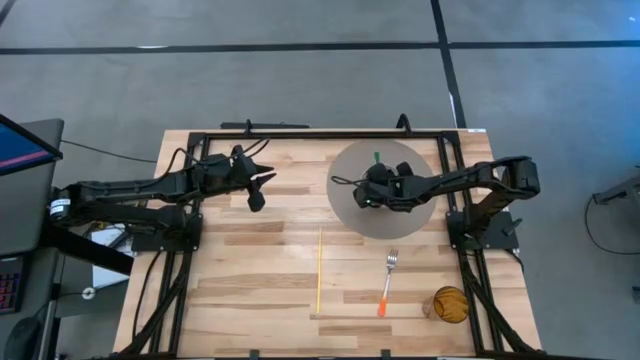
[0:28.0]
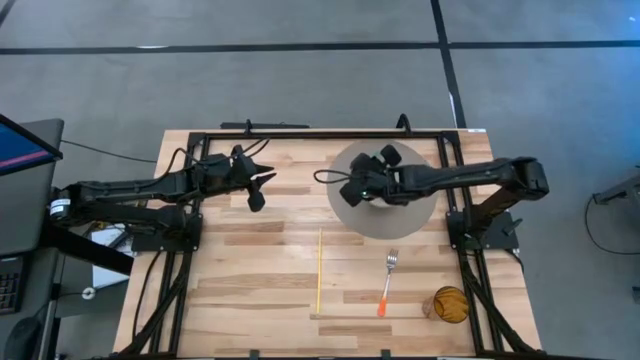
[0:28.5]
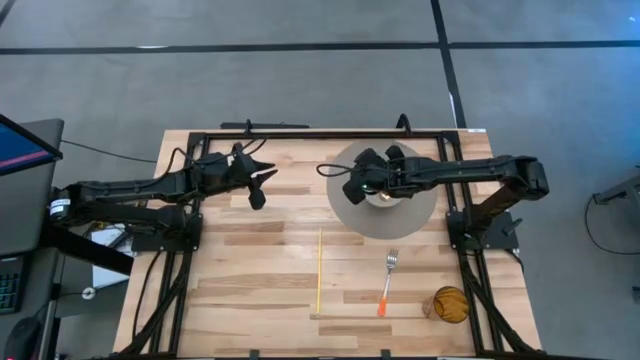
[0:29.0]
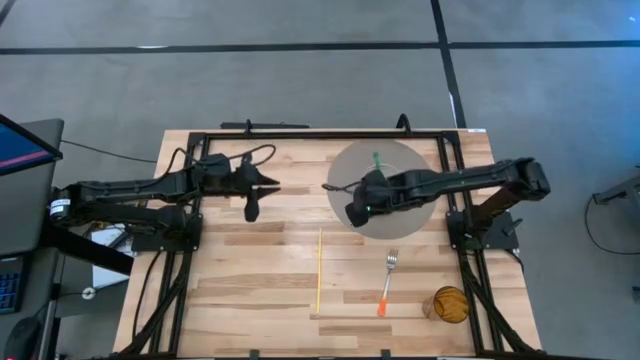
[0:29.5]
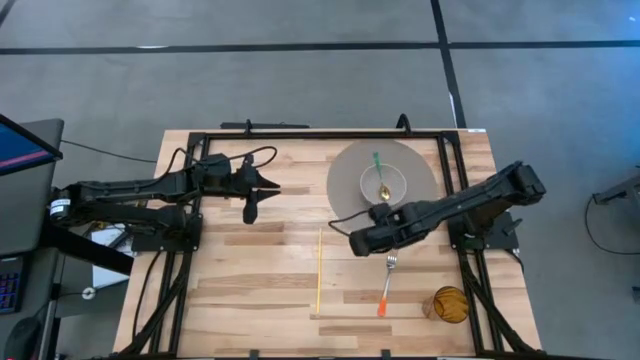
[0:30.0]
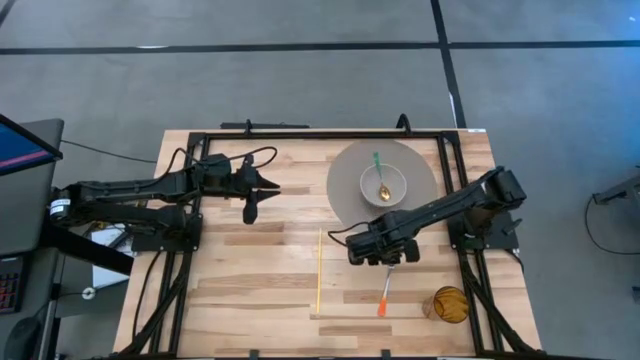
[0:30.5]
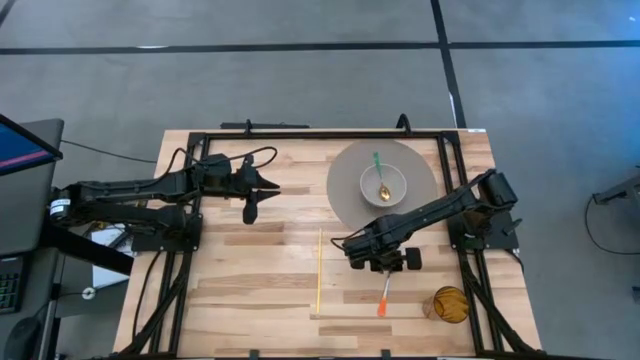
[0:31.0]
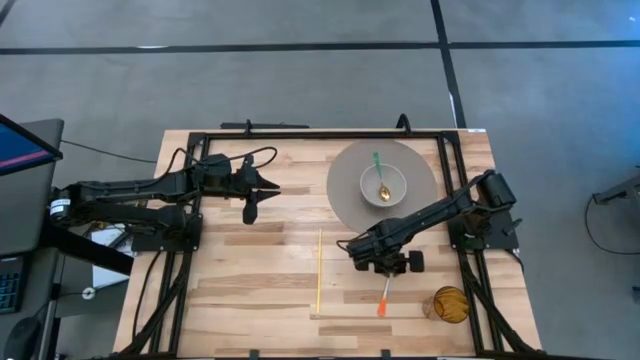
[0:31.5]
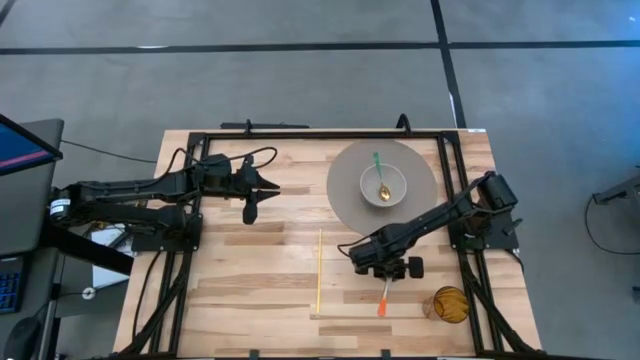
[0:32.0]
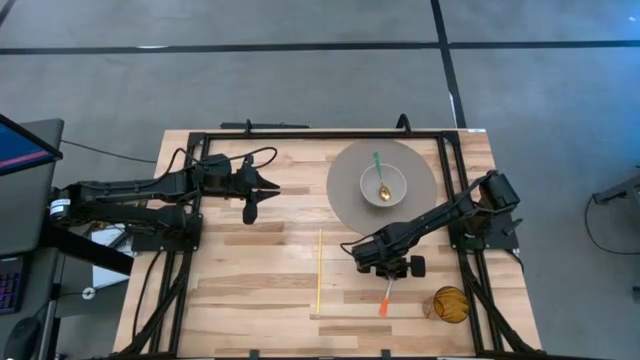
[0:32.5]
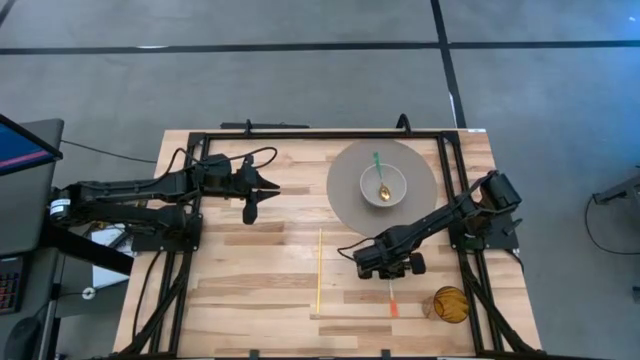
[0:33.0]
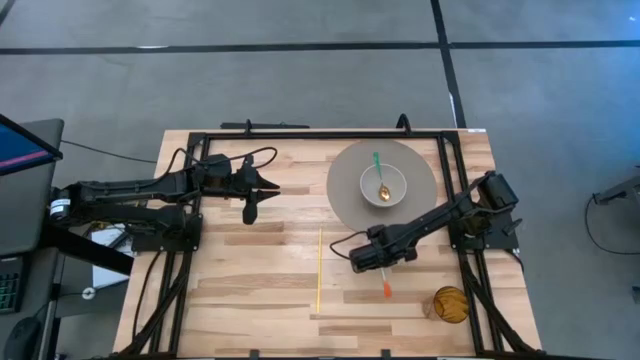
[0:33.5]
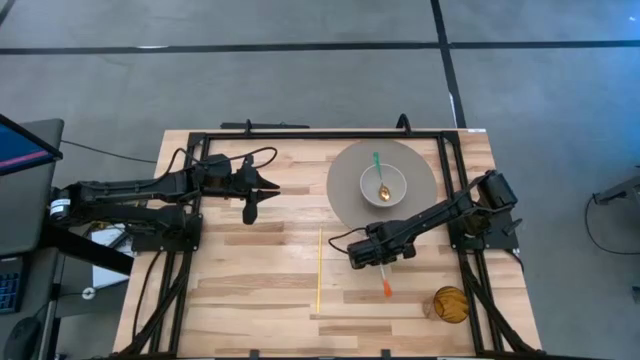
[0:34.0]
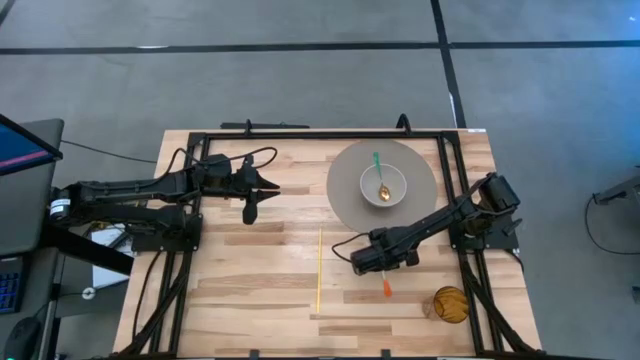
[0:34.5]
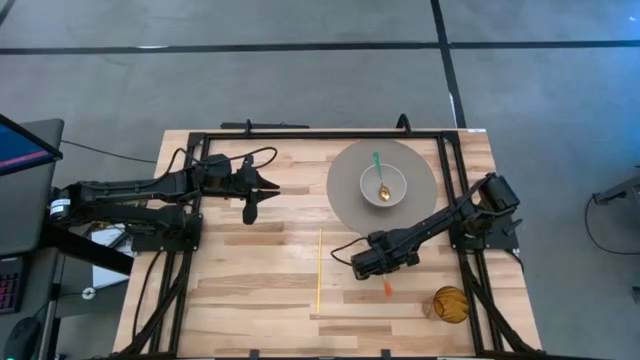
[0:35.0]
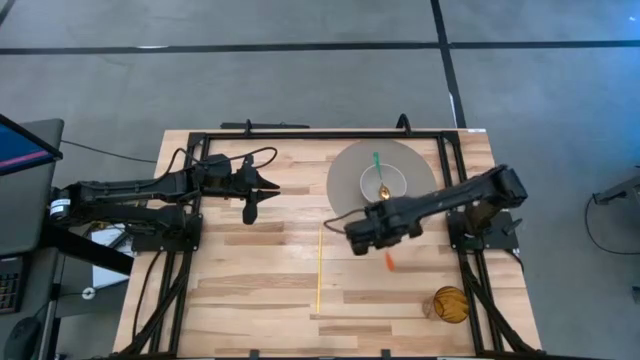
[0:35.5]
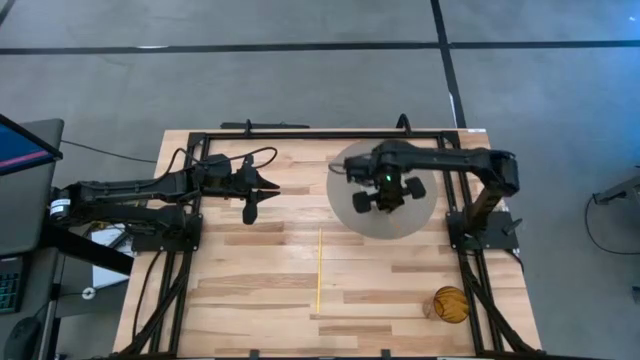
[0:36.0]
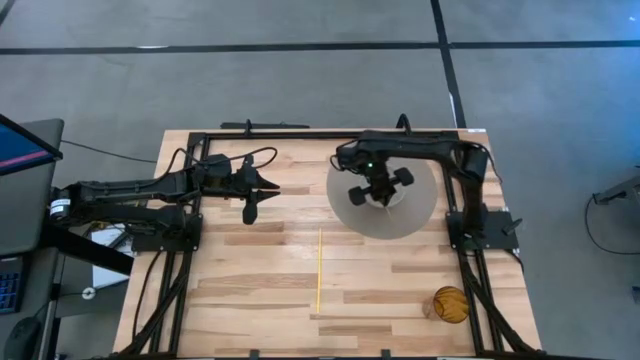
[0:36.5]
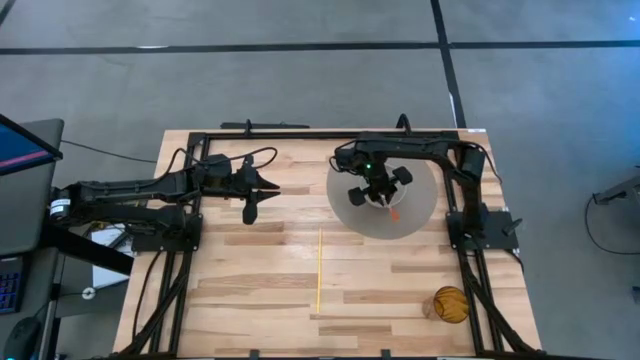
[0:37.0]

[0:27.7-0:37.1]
Task: Pick & Place Utensil
Put the orange fork into the gray bowl on the gray mat

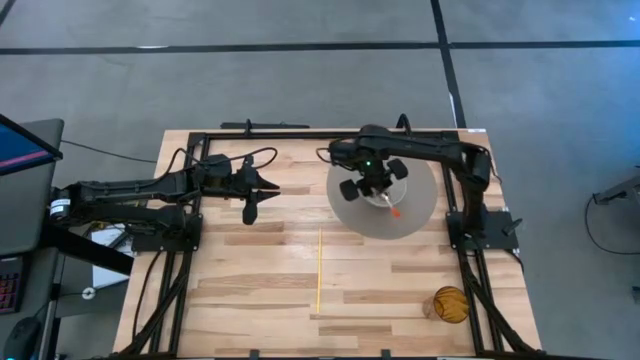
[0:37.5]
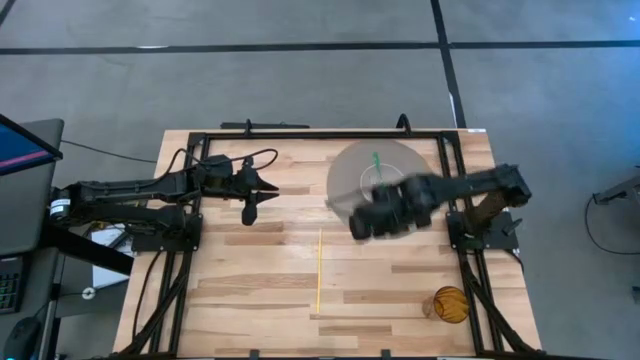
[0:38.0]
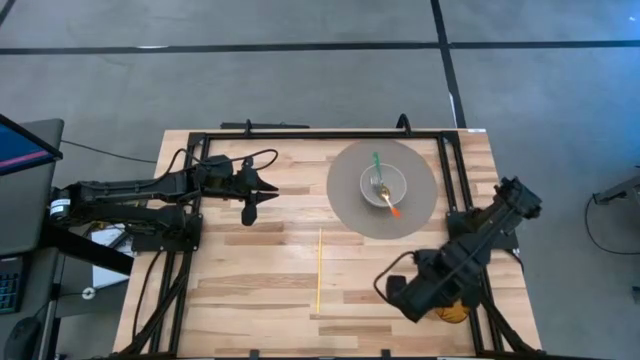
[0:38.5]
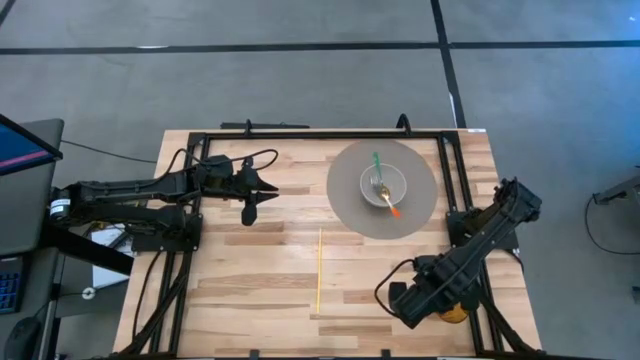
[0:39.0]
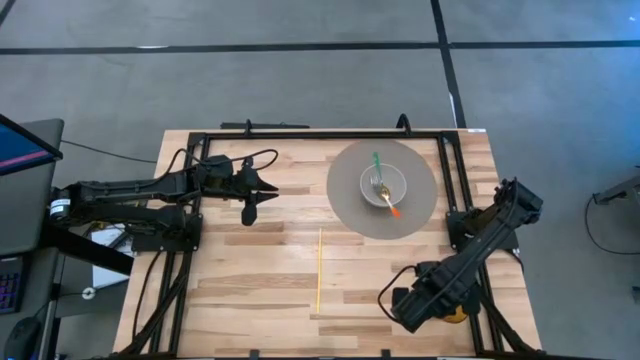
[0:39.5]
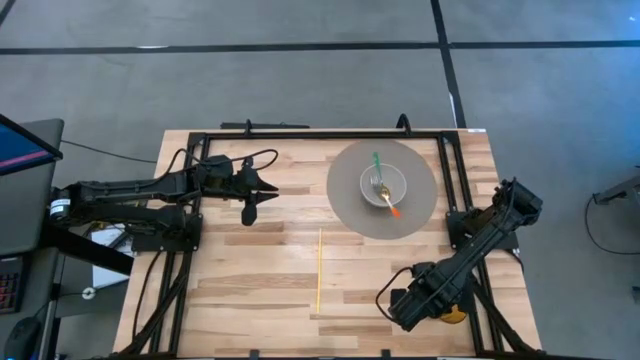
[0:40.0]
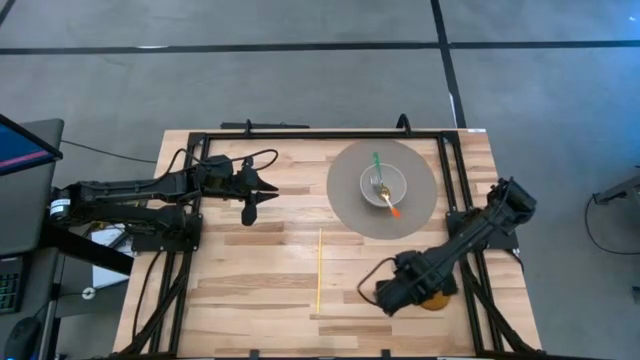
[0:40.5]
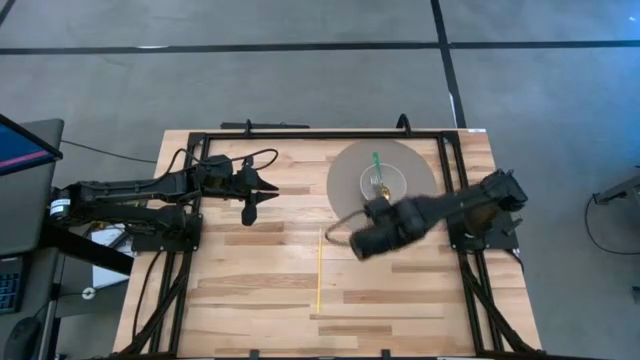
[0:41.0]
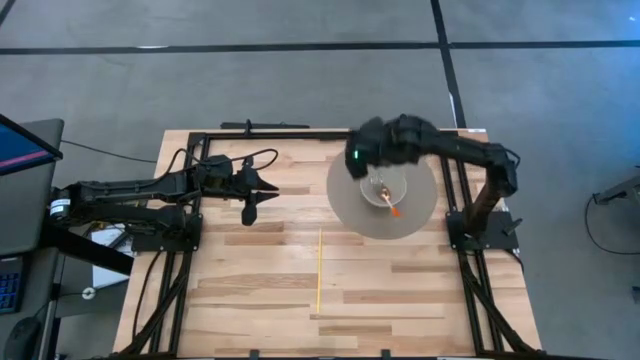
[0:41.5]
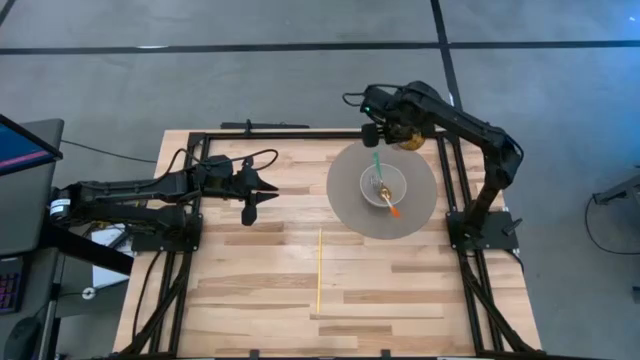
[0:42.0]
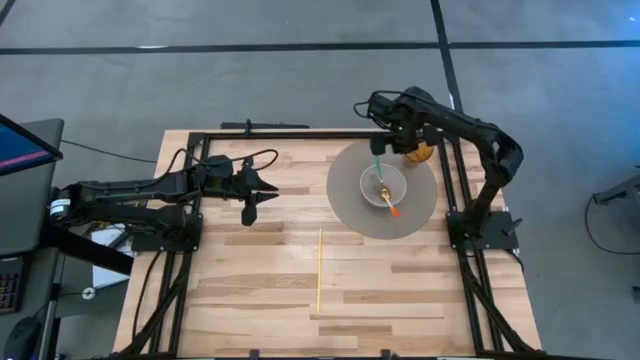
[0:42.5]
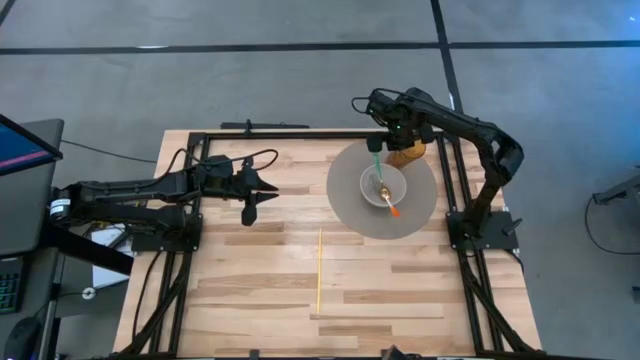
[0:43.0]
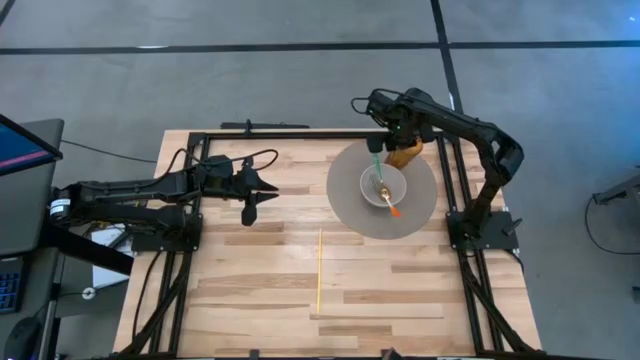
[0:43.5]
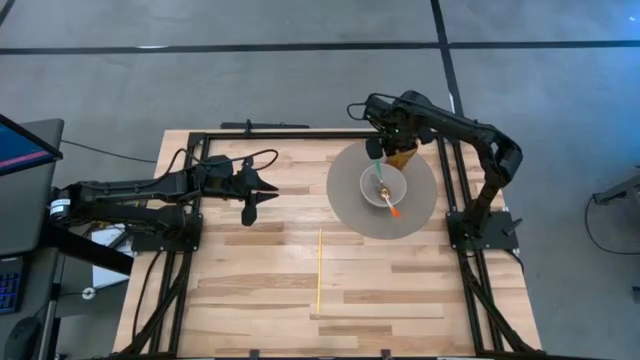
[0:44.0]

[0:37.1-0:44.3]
Put the brown cup on the gray mat to the top right of the gray bowl

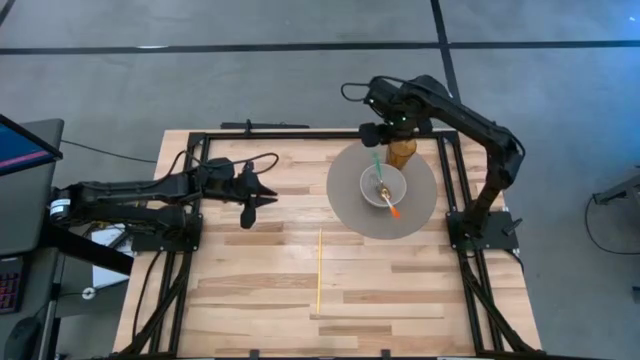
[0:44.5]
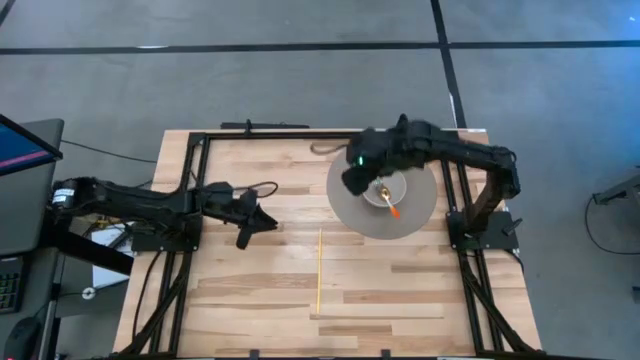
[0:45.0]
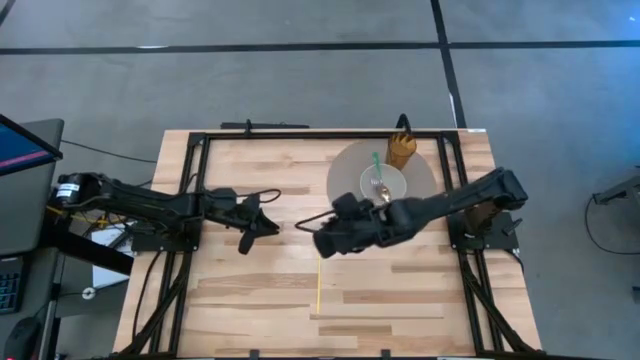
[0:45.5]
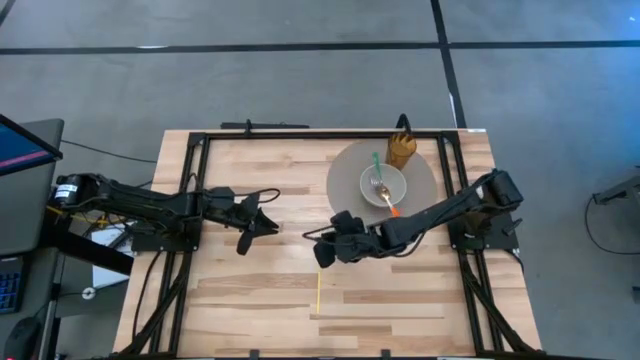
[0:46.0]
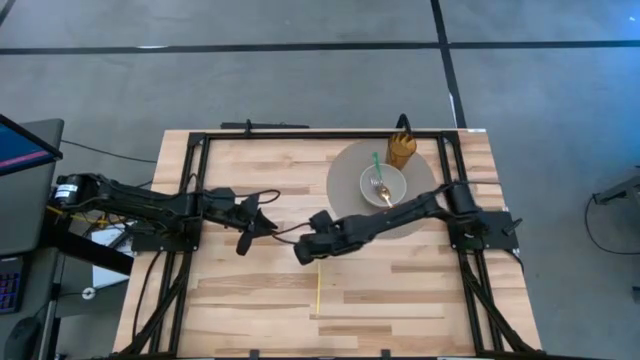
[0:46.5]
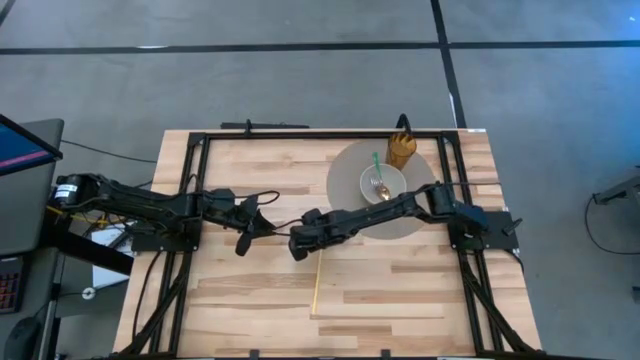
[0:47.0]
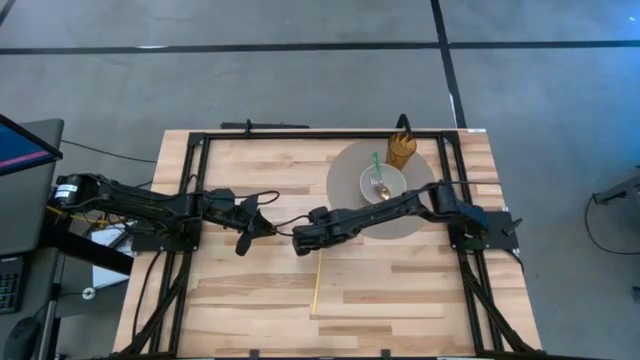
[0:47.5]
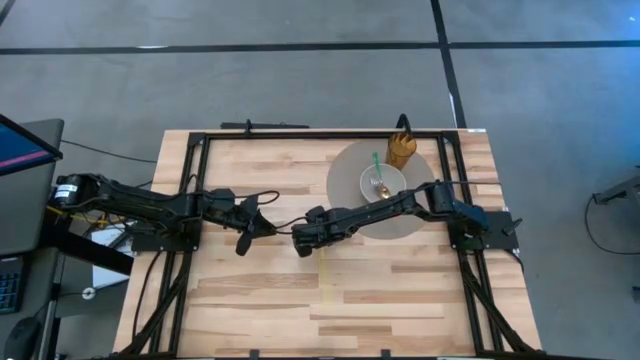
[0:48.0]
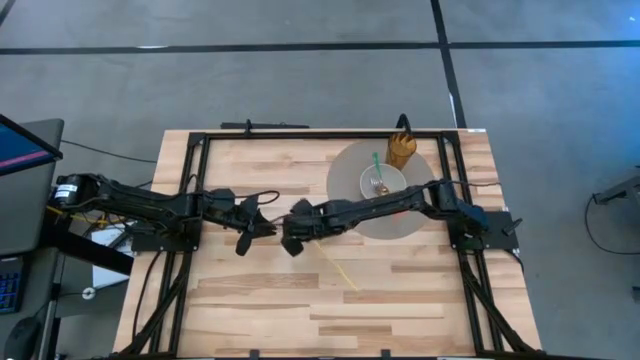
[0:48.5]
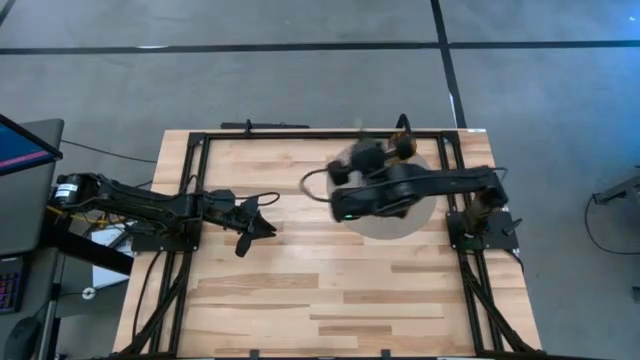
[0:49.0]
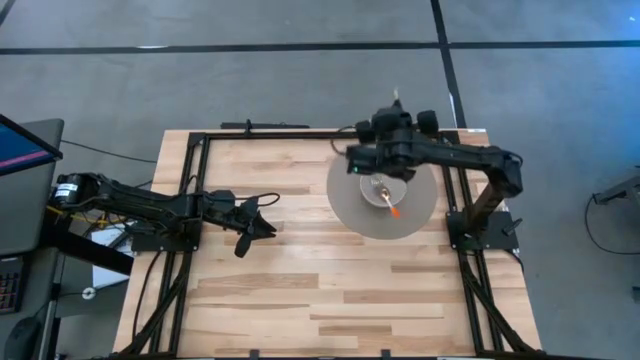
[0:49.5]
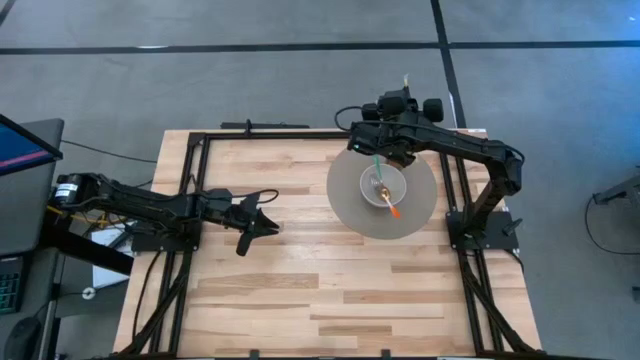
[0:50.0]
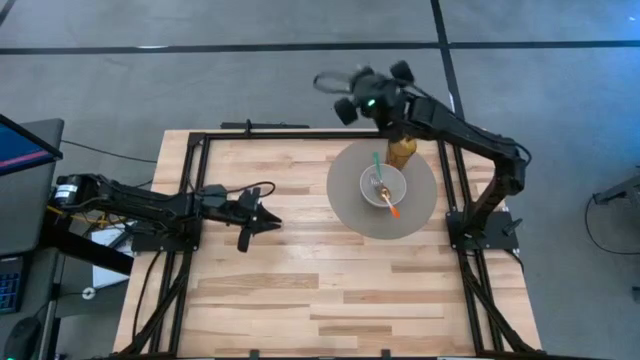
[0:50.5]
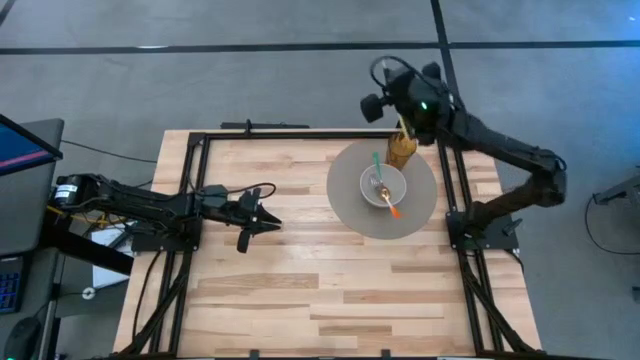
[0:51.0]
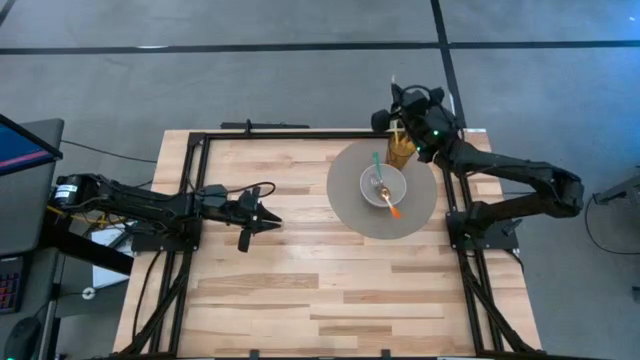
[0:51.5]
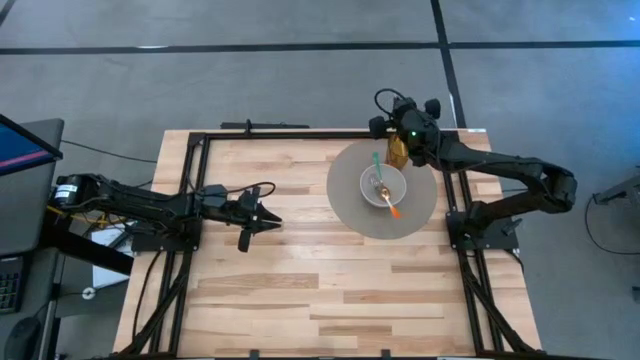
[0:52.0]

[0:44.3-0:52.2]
Put the yellow straw into the brown cup on the gray mat
